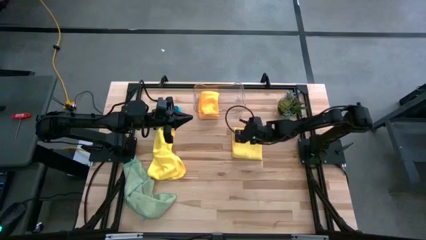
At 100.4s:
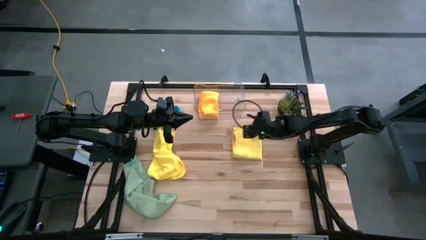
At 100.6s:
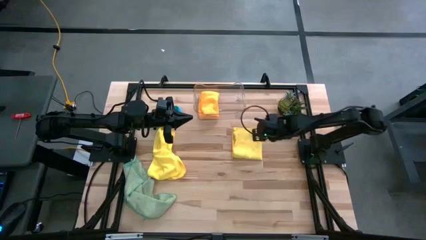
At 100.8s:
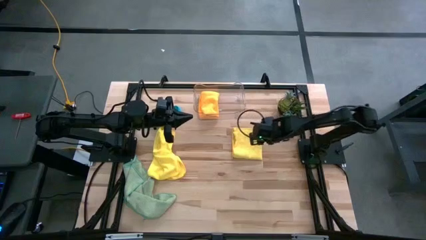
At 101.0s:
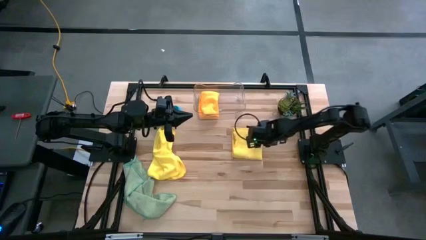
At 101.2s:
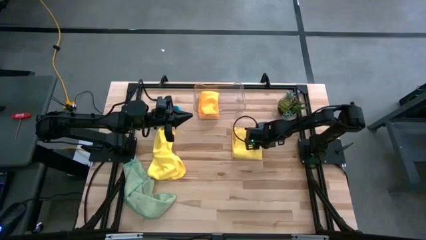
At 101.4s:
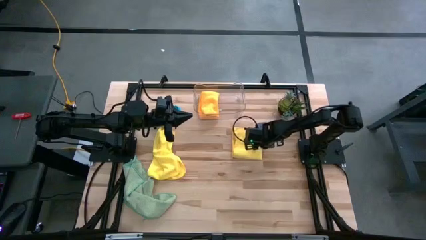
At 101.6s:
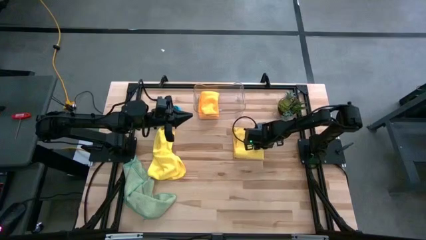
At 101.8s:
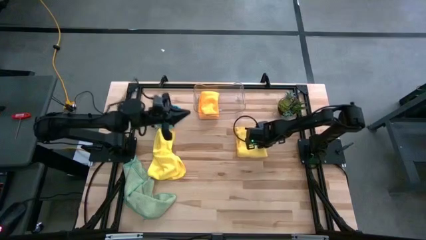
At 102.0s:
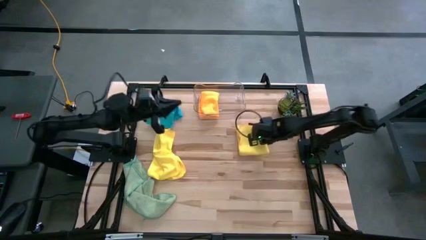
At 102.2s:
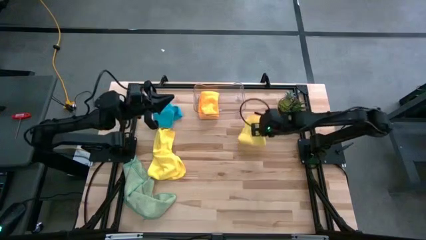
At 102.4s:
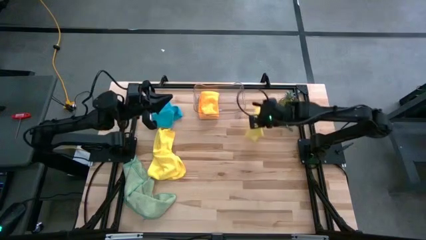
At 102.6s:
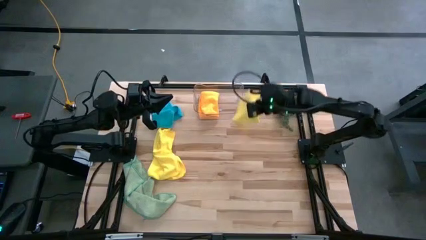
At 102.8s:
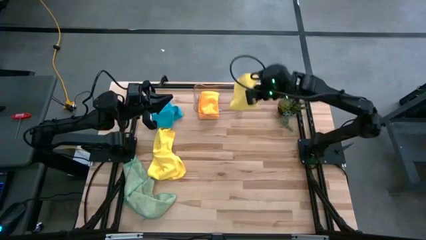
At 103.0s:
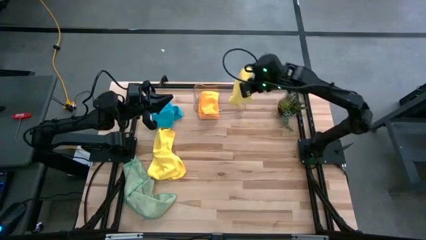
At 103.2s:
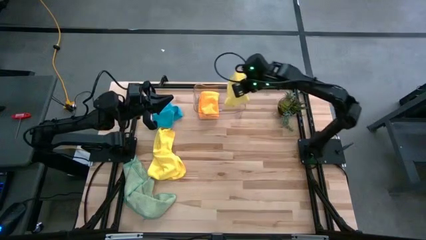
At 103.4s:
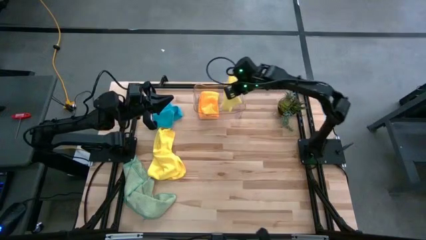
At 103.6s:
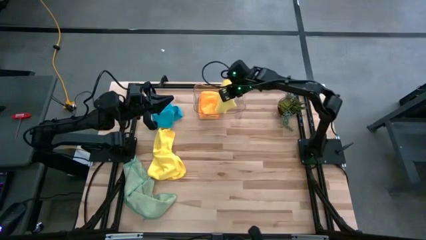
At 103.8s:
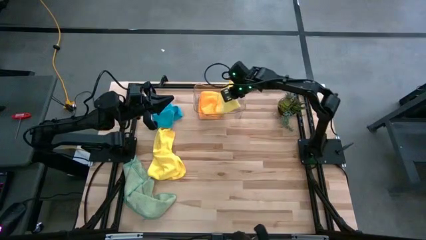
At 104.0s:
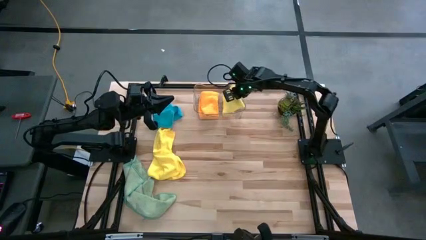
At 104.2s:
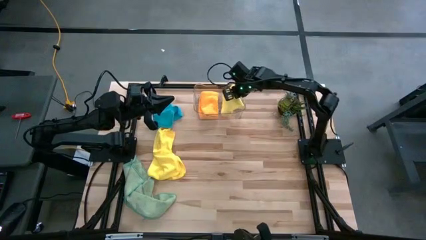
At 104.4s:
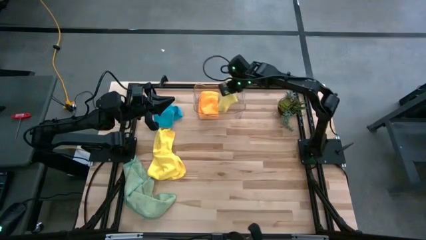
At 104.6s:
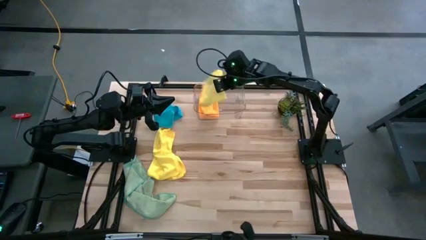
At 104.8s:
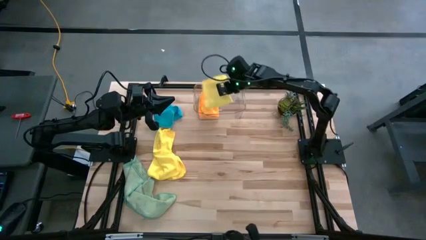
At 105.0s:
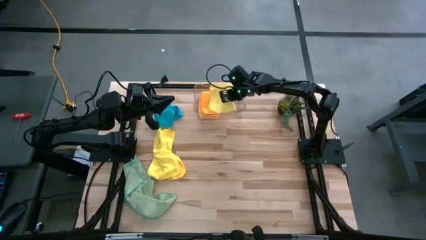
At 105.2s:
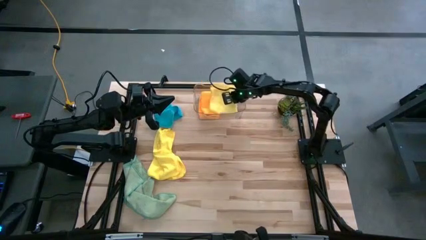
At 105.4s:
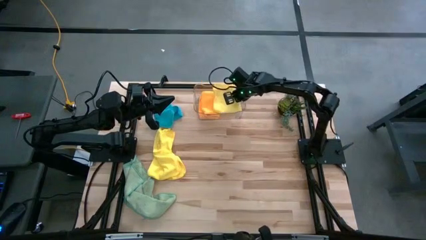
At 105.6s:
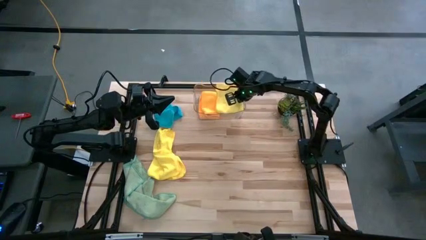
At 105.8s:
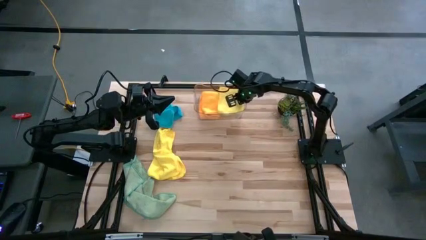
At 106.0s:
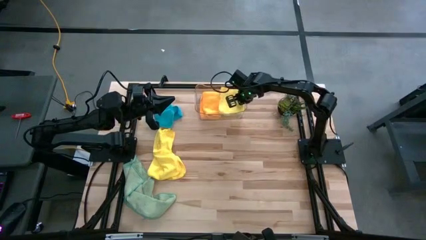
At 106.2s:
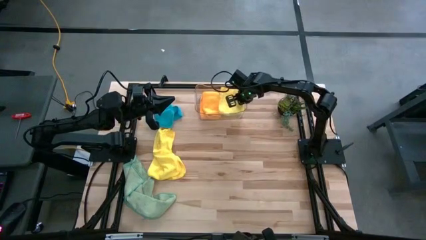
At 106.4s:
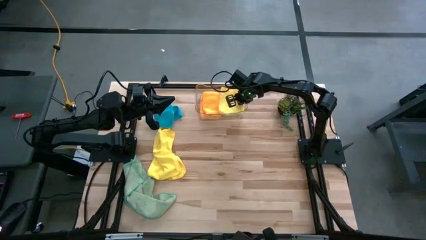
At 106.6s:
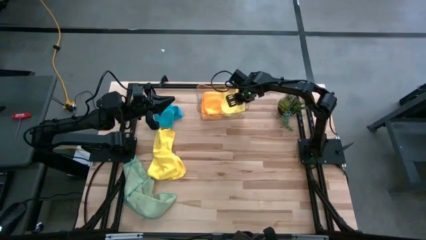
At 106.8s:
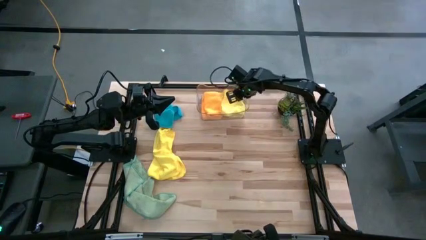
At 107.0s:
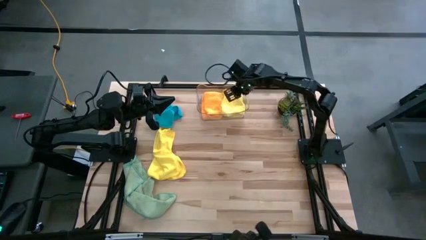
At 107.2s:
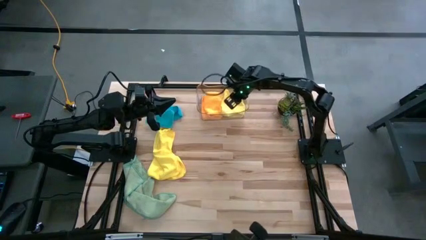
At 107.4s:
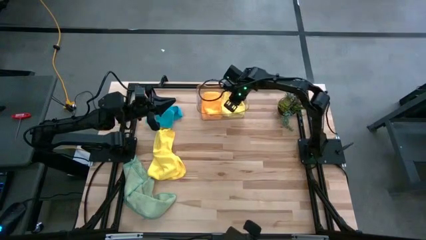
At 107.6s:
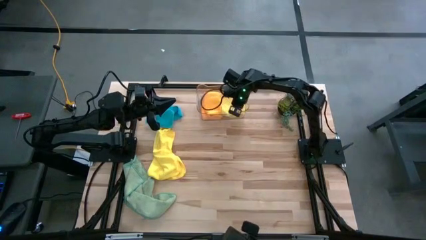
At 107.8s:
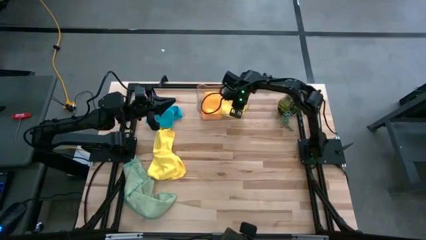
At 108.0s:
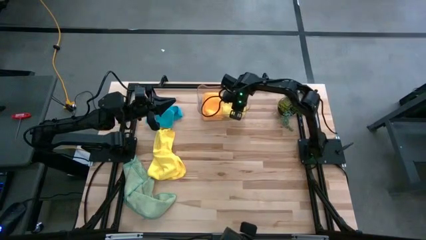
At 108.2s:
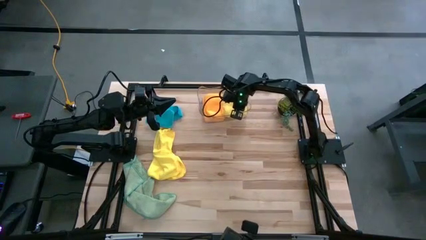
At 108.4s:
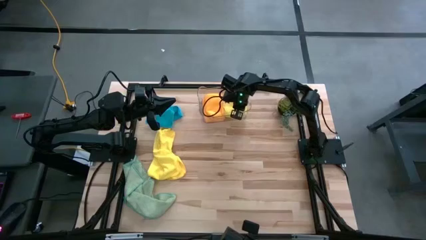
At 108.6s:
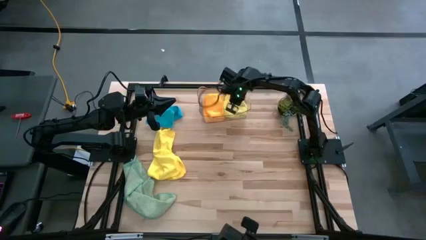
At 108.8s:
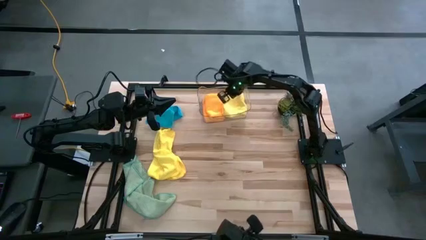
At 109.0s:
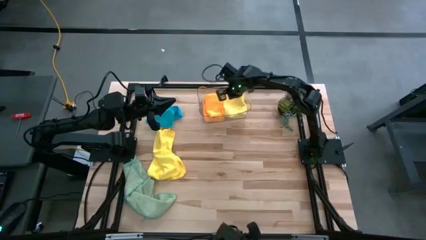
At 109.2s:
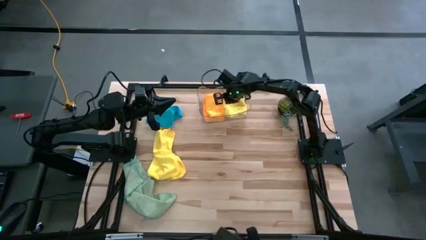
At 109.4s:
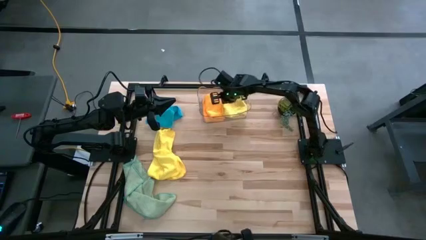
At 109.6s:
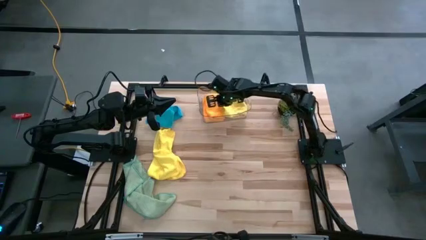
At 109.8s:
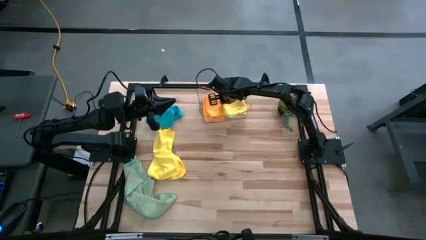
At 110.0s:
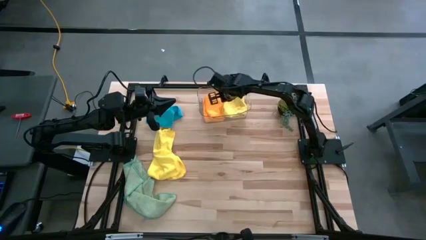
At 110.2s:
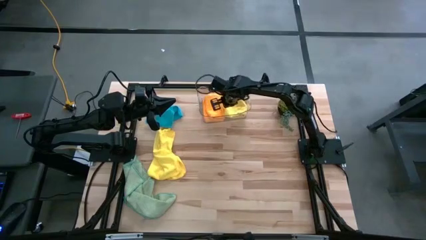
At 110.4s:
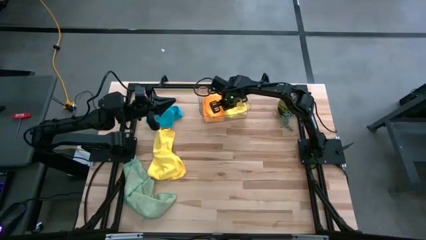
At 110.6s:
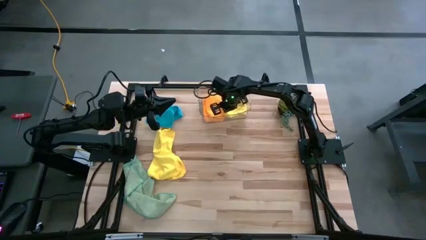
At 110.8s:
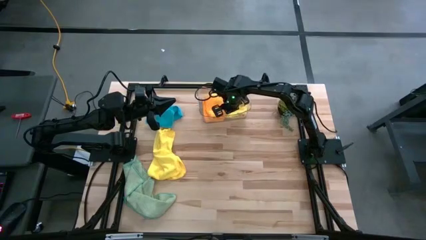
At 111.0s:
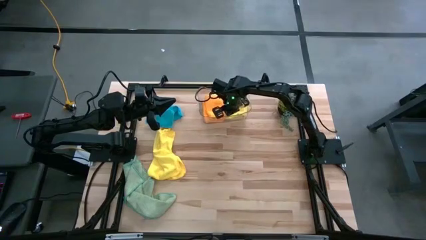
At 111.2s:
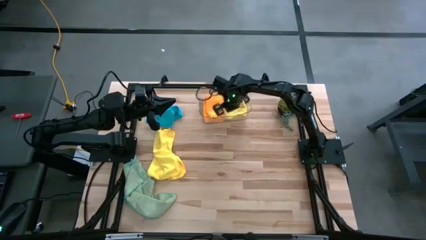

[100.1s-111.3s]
Task: Fold microfiber towels
Put the right yellow microfiber towel into the transparent bin

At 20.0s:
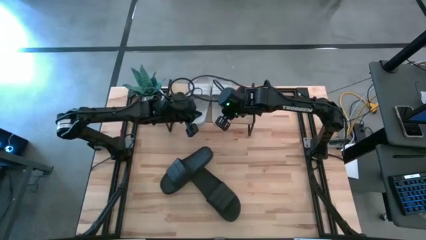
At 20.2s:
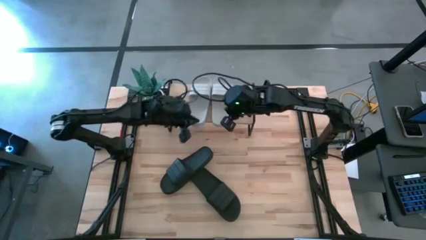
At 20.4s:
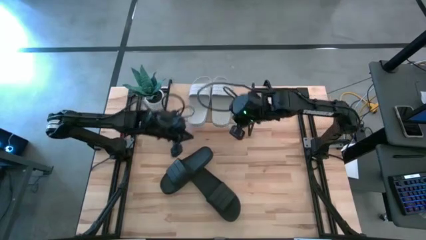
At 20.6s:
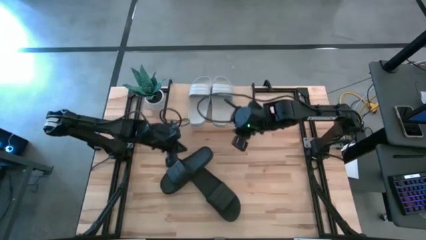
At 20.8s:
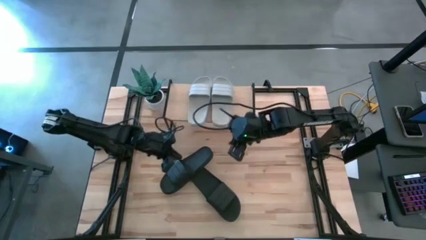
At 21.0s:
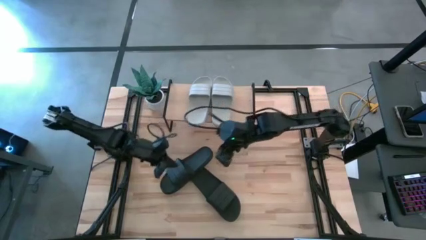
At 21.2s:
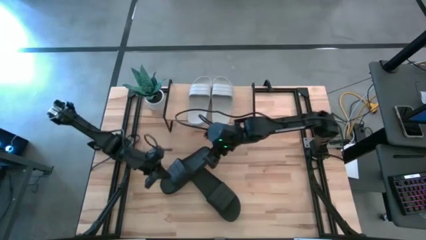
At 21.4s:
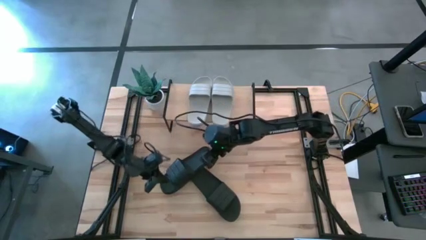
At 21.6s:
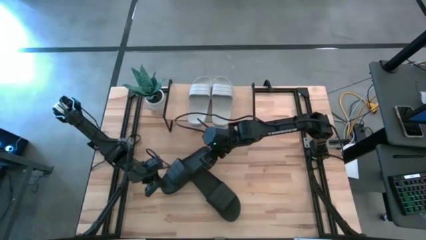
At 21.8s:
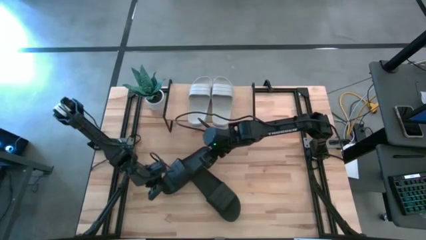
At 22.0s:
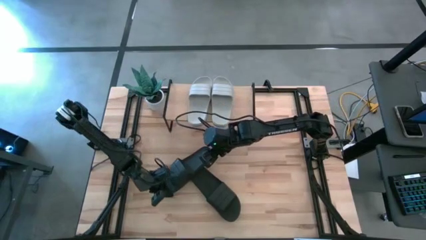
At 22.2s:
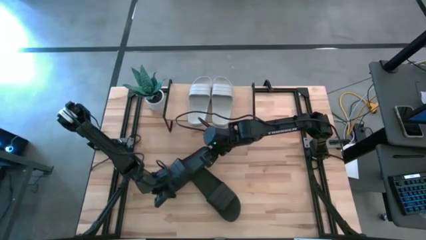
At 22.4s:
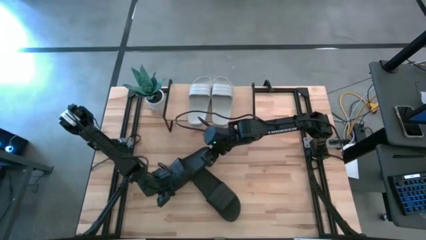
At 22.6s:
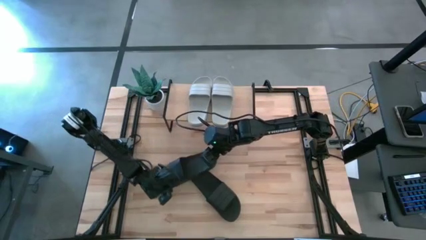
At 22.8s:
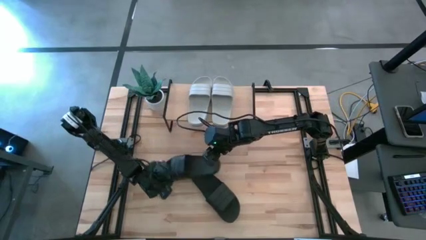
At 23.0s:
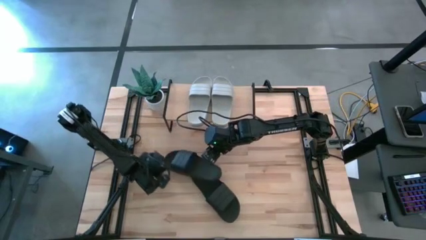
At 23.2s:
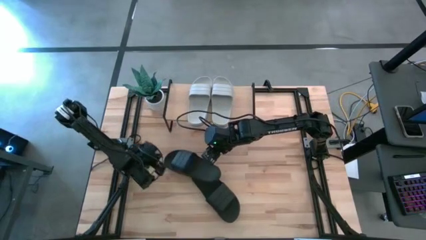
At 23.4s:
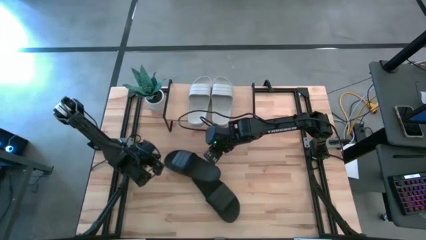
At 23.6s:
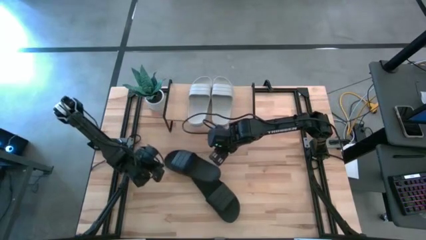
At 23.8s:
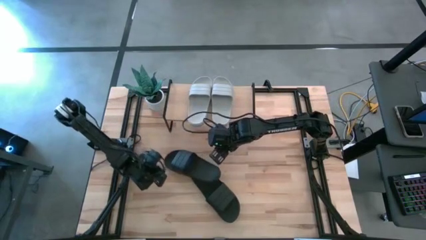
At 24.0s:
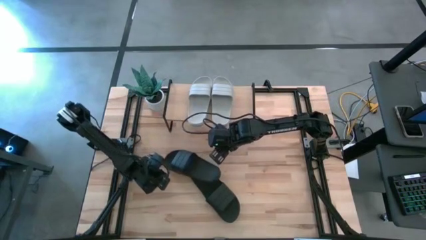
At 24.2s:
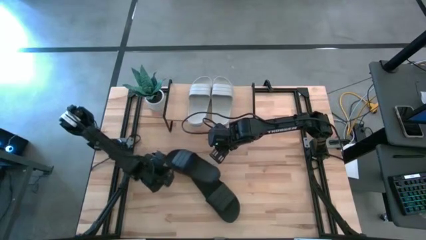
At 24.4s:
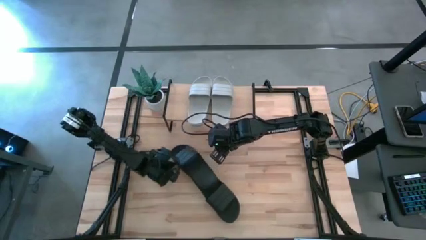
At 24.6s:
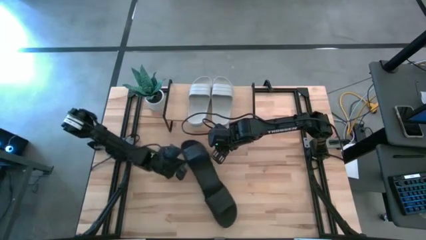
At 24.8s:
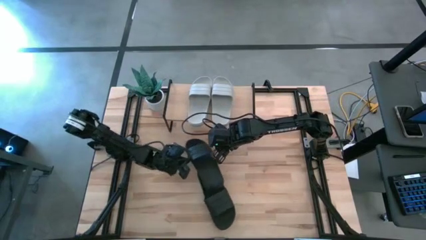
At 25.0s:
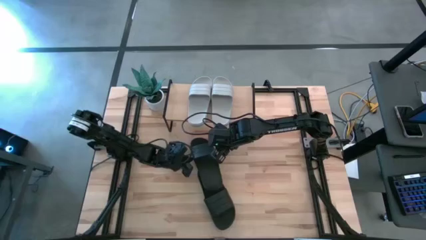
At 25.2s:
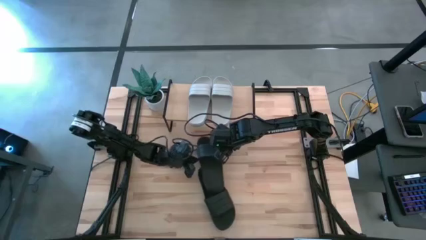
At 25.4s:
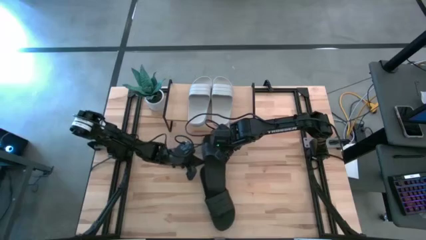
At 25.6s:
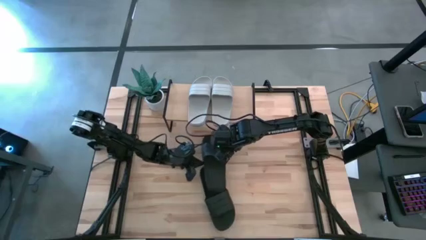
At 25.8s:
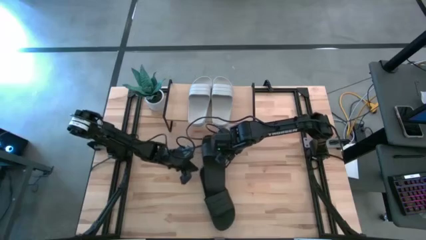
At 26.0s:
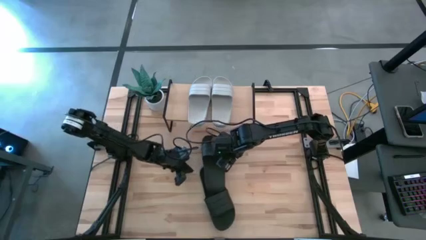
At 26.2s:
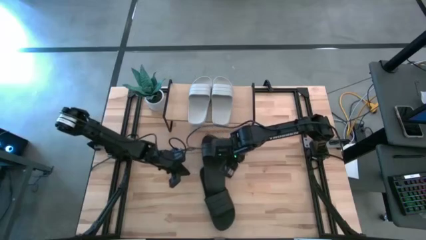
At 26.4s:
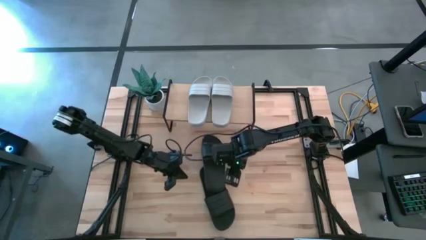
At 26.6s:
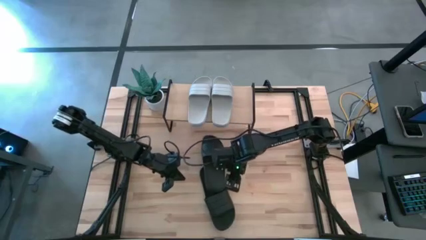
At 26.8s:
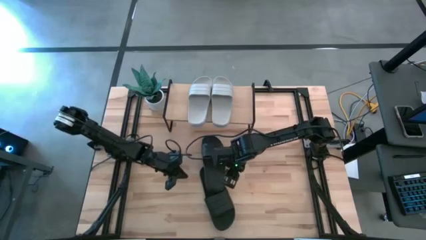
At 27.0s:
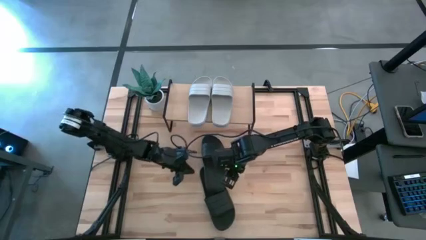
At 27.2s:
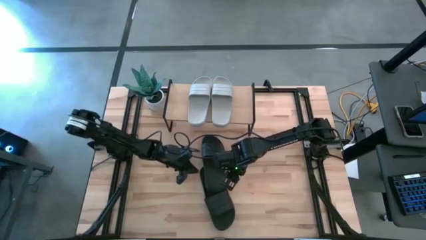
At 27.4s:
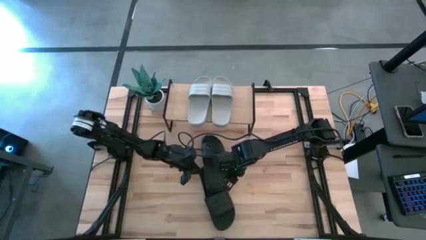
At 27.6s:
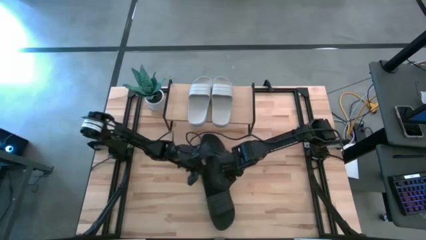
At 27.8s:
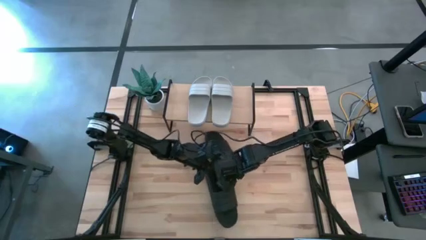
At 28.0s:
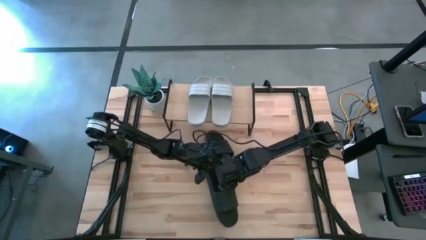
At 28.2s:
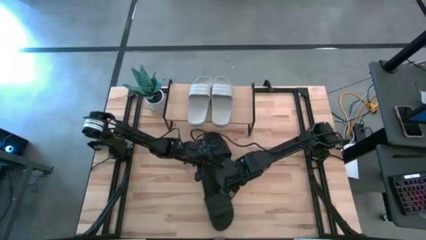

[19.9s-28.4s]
Task: Pick and place slides into the shelf
Put the top black slide under the shelf
